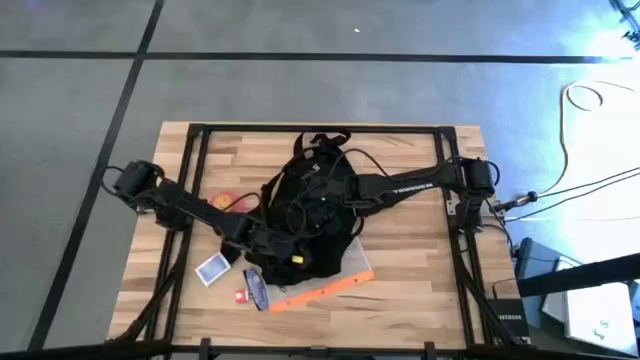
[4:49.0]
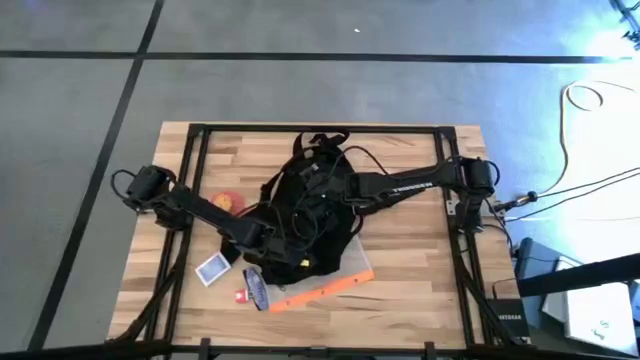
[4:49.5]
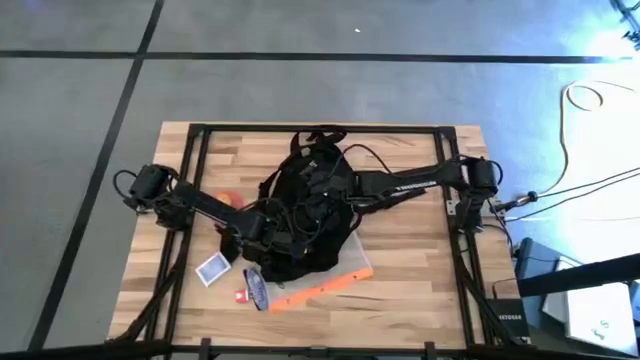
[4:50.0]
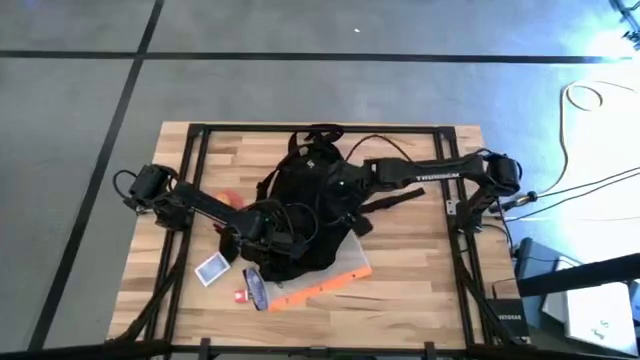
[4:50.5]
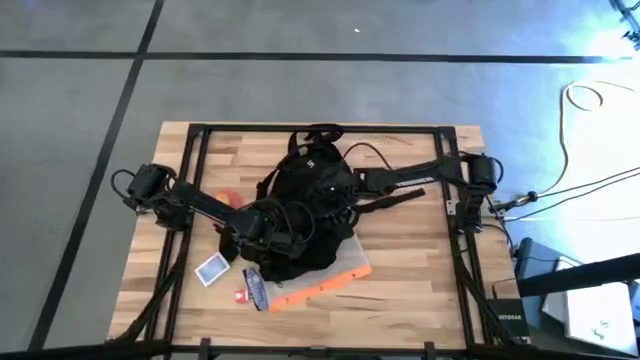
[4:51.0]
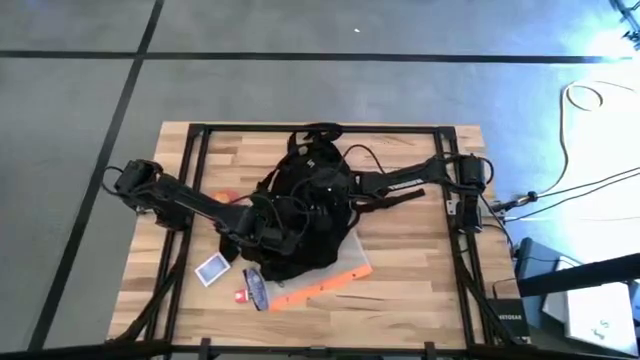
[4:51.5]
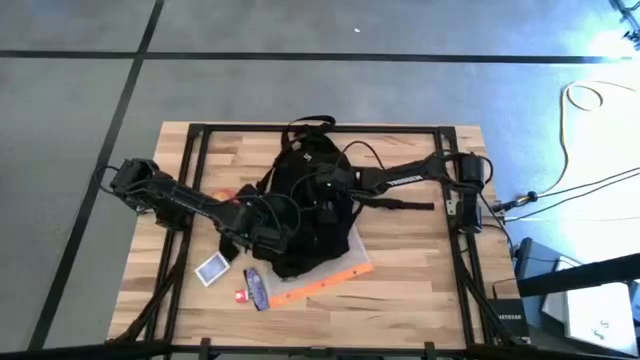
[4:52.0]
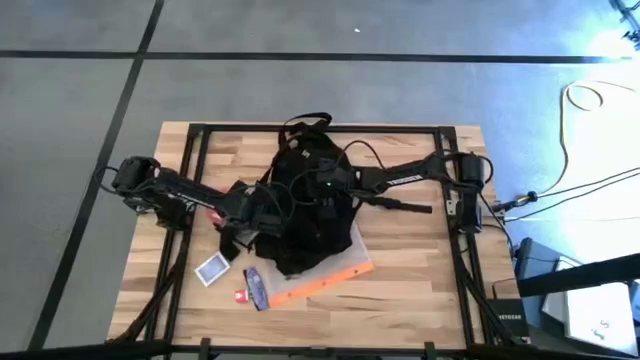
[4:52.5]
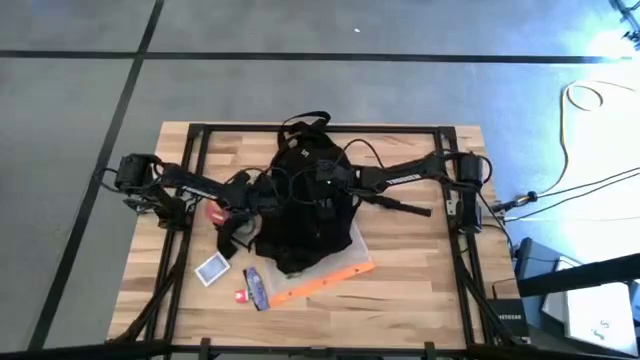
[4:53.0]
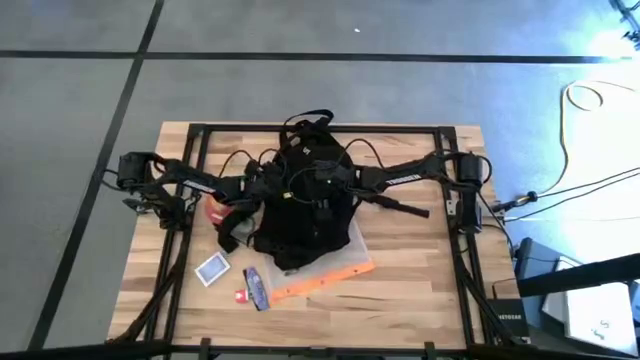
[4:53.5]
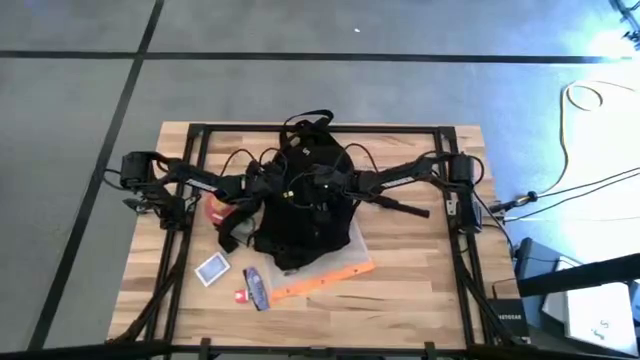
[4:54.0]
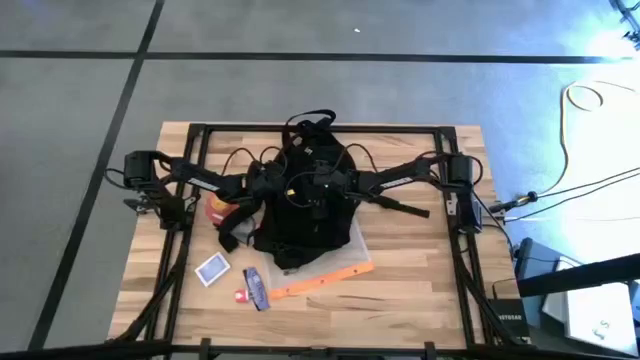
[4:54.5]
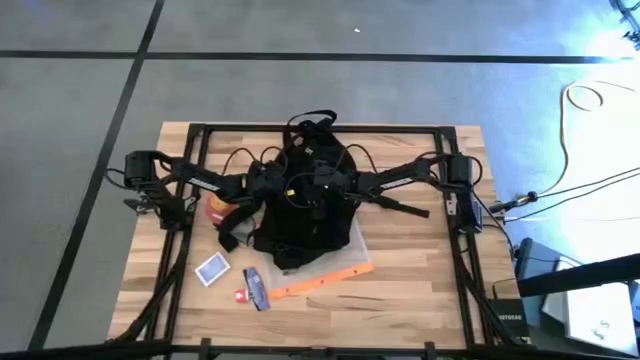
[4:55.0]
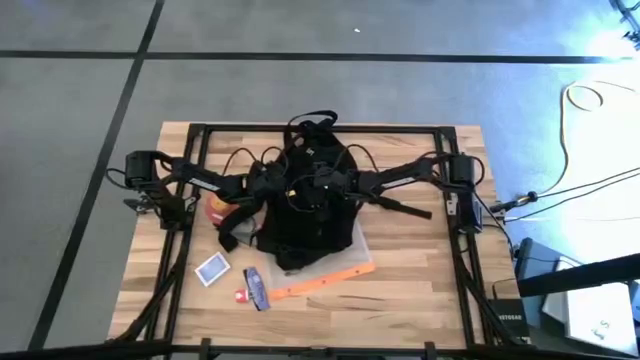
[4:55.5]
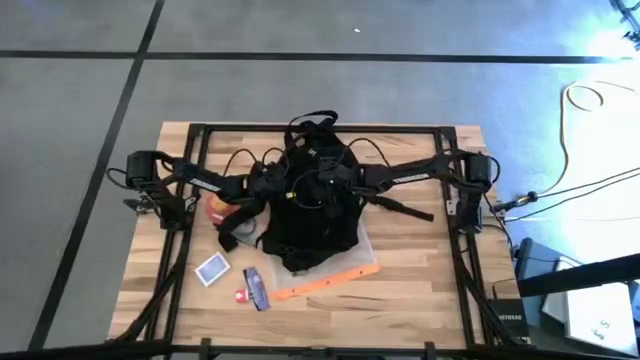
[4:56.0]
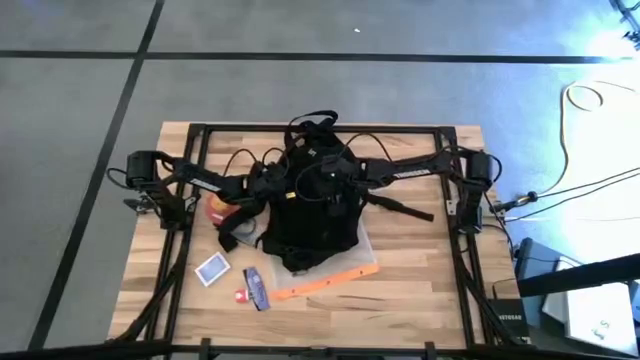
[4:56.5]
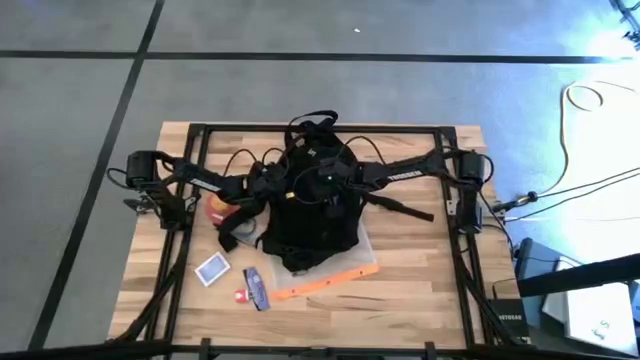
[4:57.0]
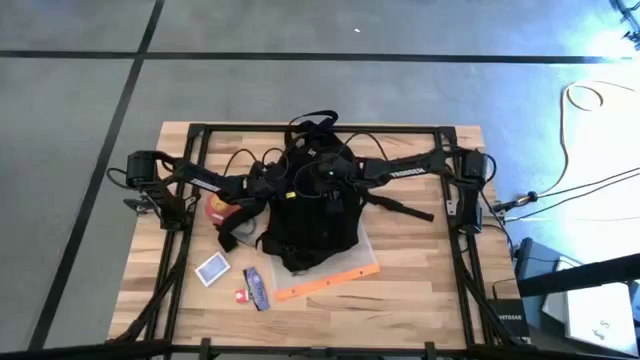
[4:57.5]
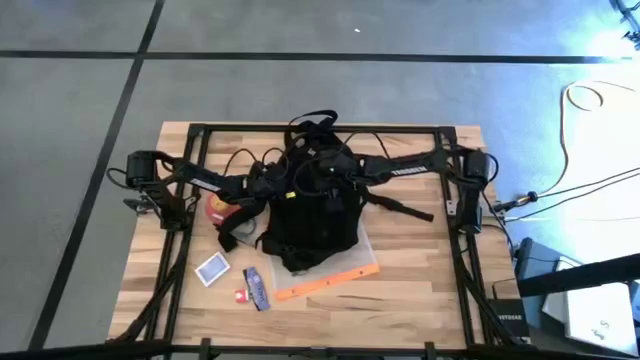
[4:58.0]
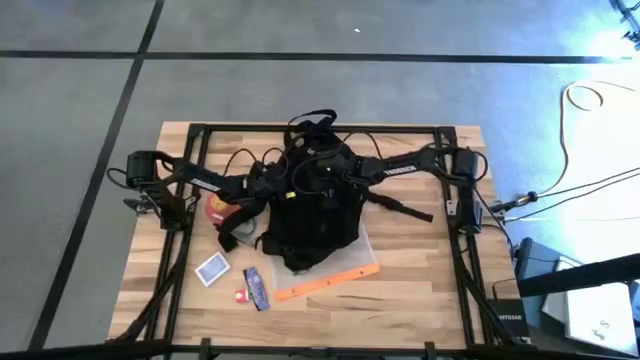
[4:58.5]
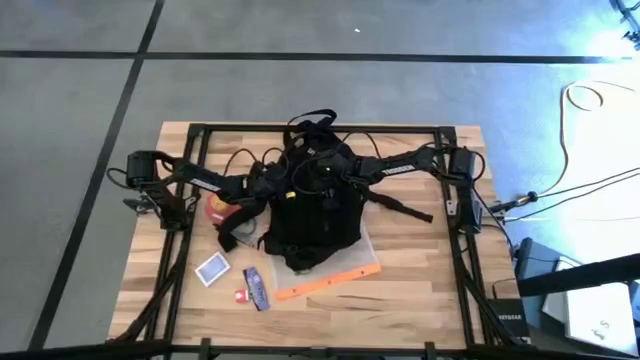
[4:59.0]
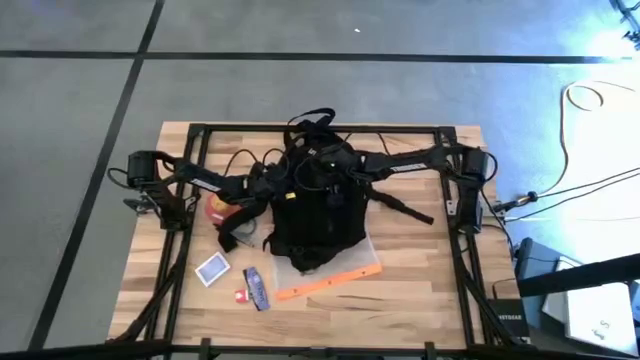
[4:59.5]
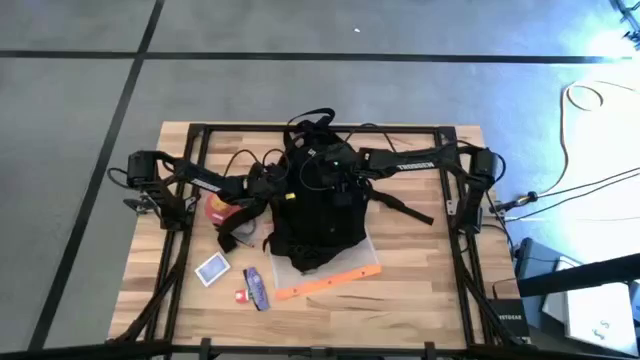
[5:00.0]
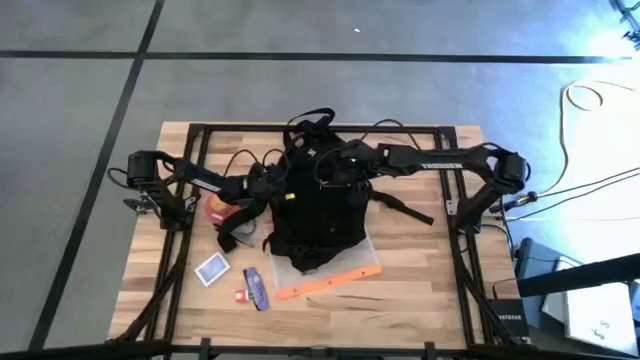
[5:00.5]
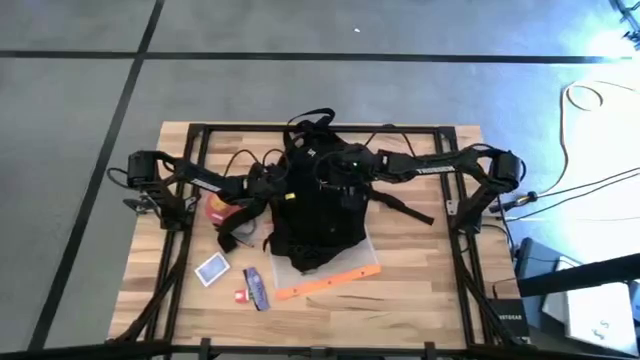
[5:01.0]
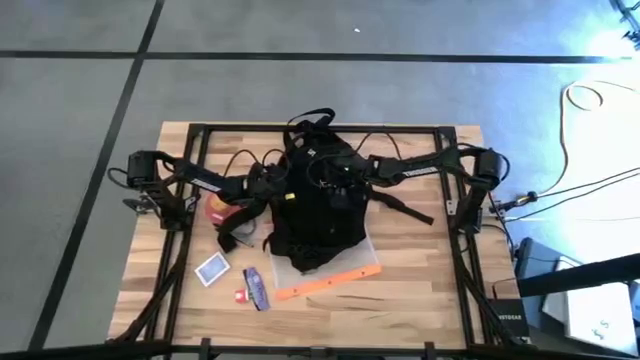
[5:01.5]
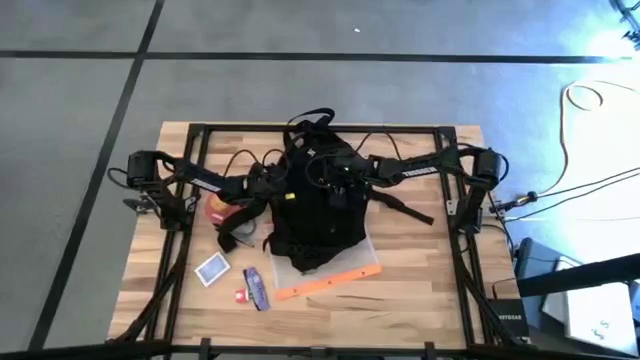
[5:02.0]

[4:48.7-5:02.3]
Task: Unpack backpack
Remove the pink charger cable from the black backpack

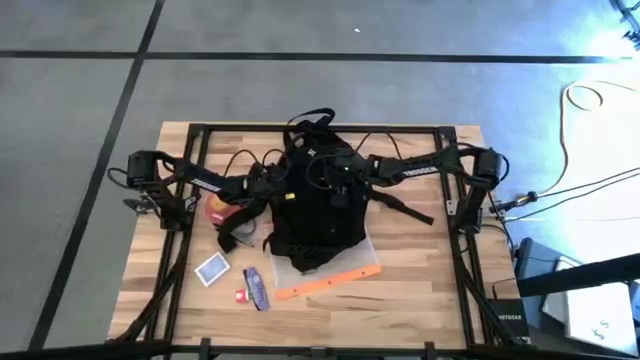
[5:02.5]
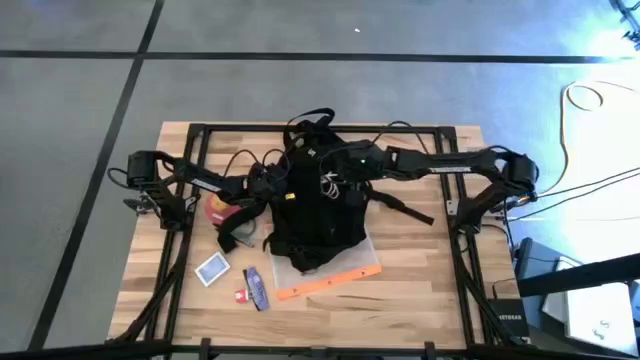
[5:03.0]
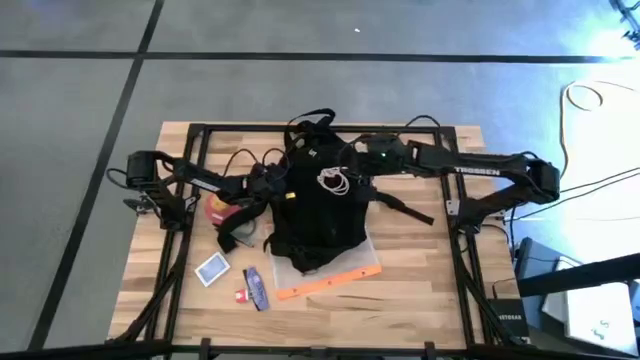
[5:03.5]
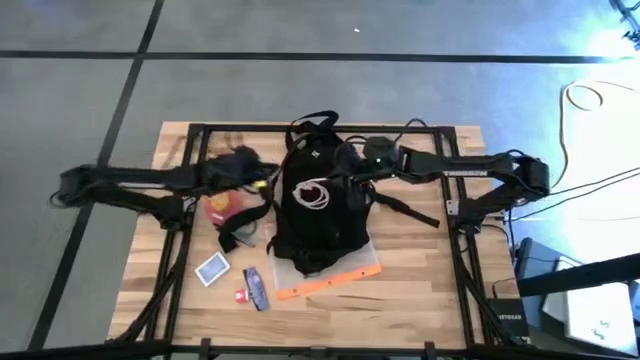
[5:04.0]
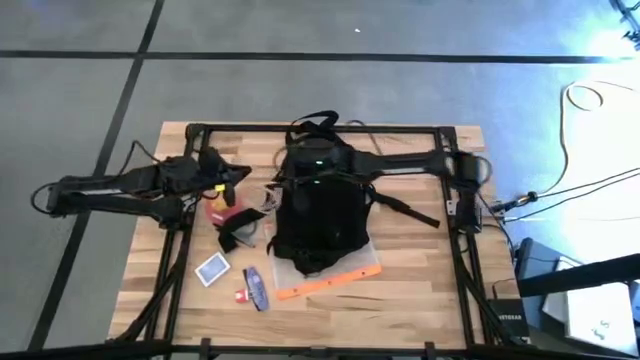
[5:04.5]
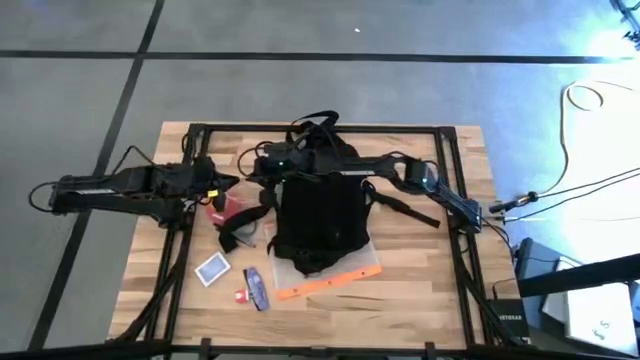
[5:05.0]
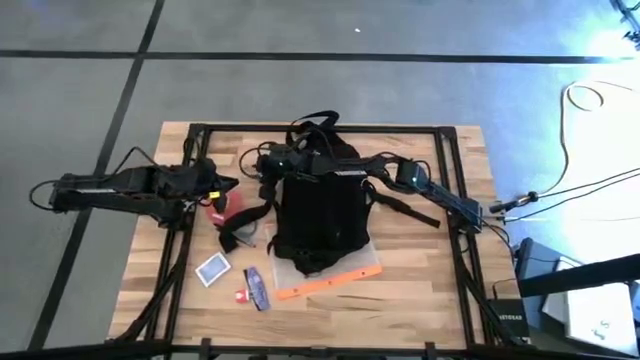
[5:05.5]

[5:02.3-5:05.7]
Remove the pink charger cable from the black backpack

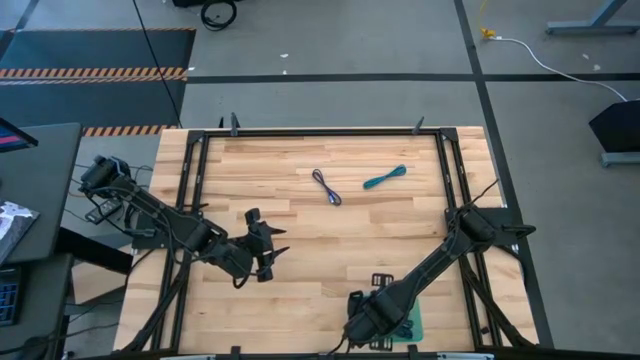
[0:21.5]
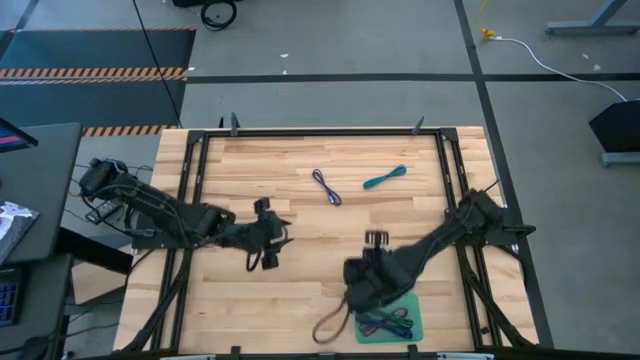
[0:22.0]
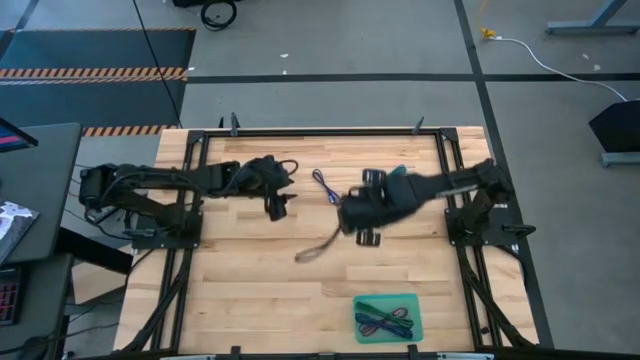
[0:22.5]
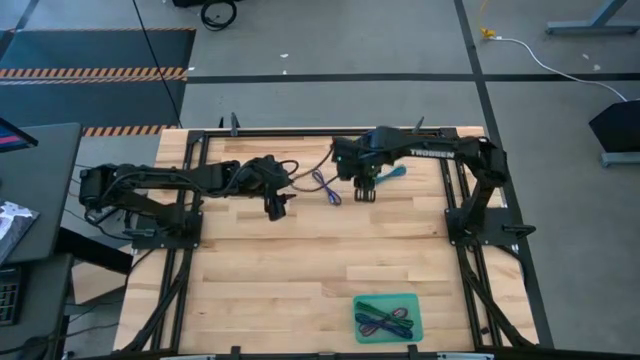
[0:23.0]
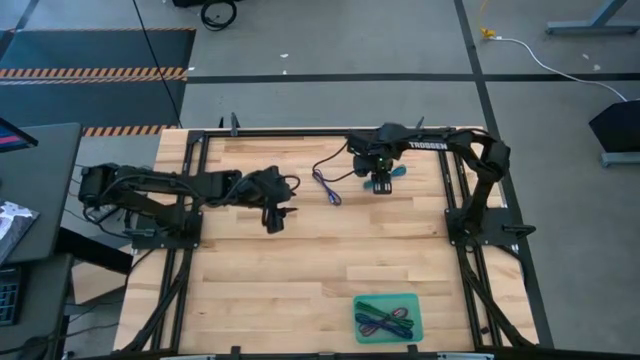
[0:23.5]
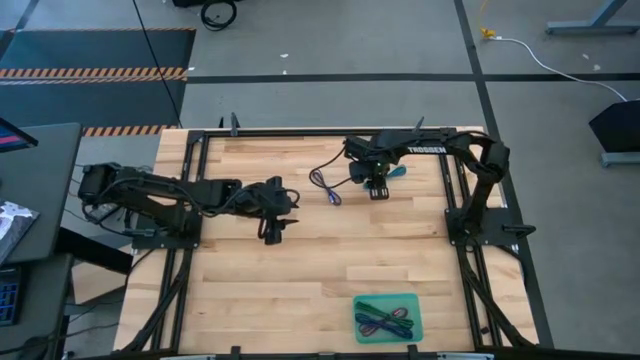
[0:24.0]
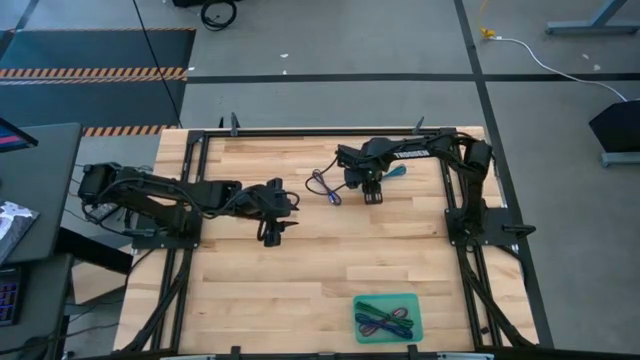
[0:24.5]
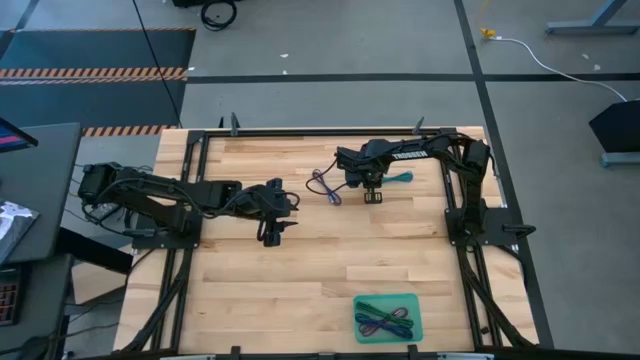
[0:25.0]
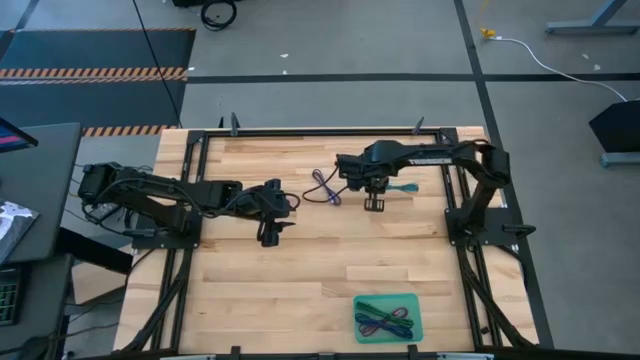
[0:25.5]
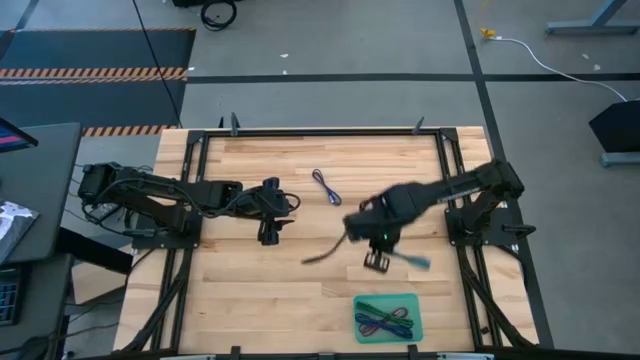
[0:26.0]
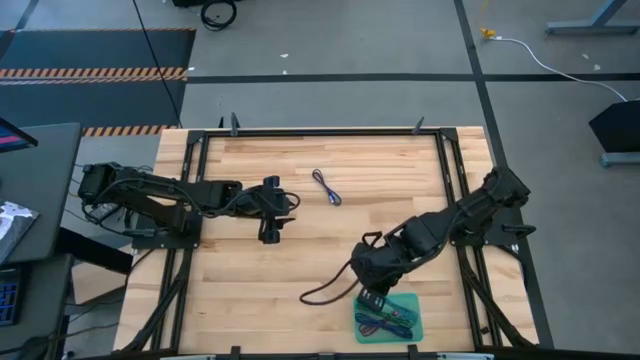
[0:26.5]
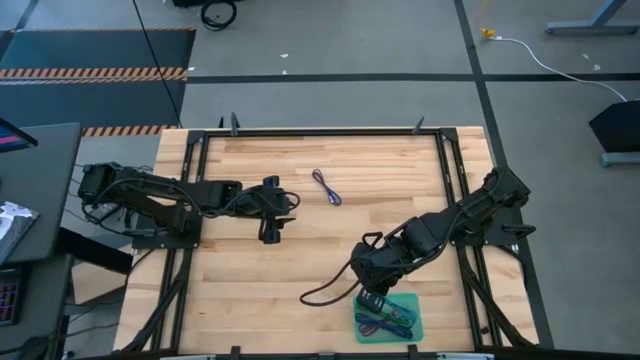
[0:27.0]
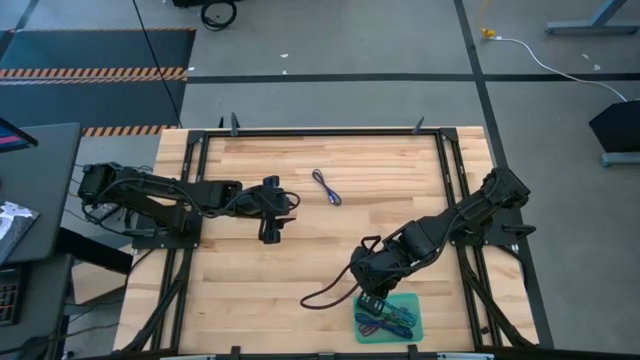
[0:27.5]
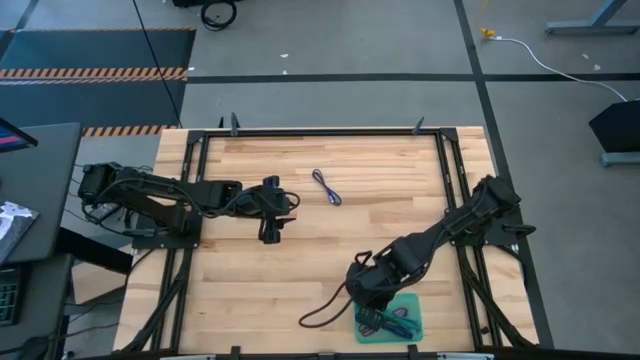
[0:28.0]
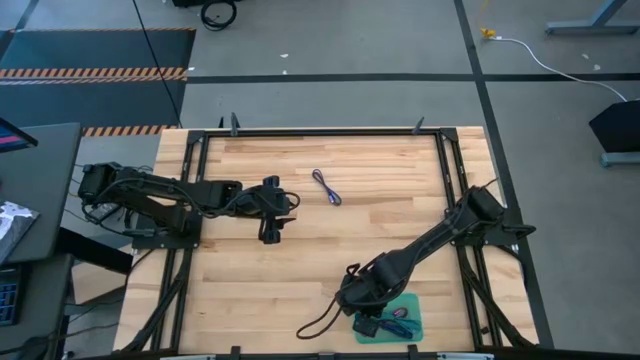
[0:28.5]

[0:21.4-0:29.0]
Task: Pick and place USB-C Cables
Put the light blue charger cable into the blue bin
